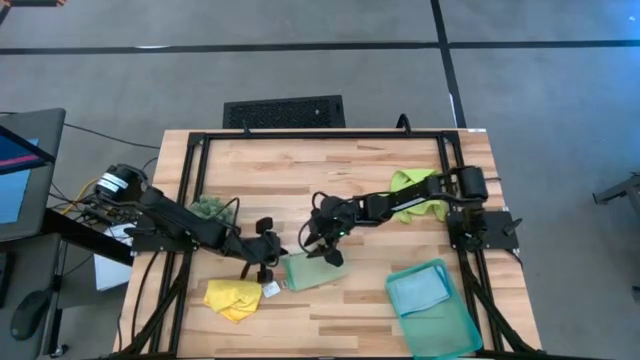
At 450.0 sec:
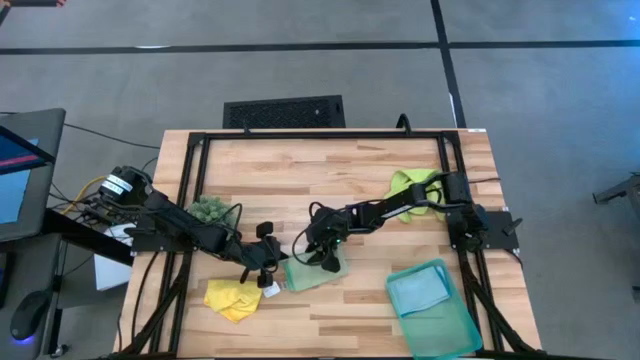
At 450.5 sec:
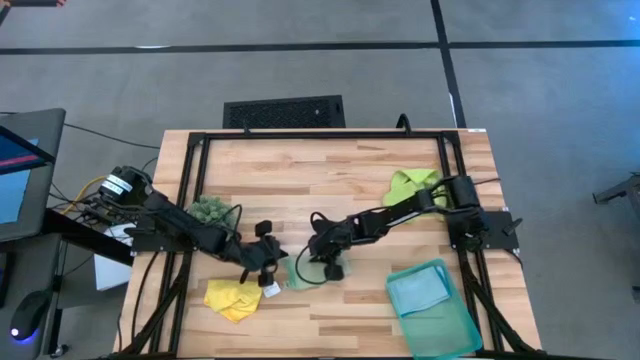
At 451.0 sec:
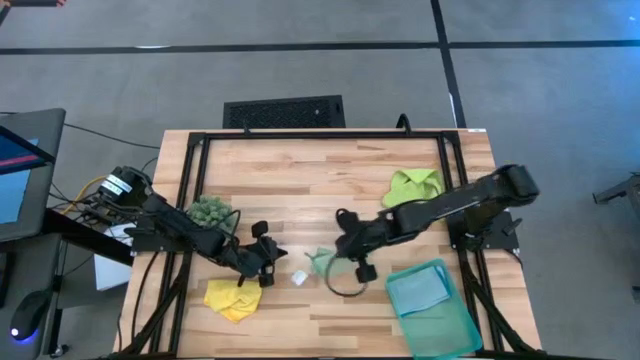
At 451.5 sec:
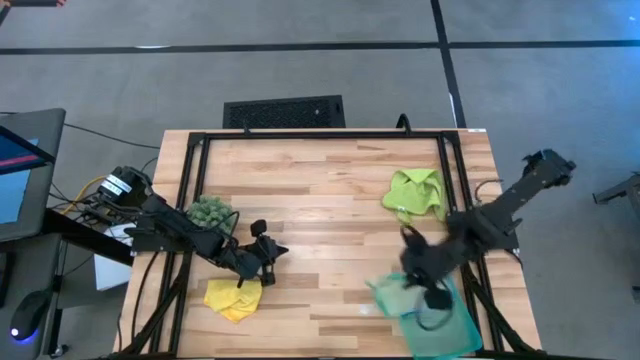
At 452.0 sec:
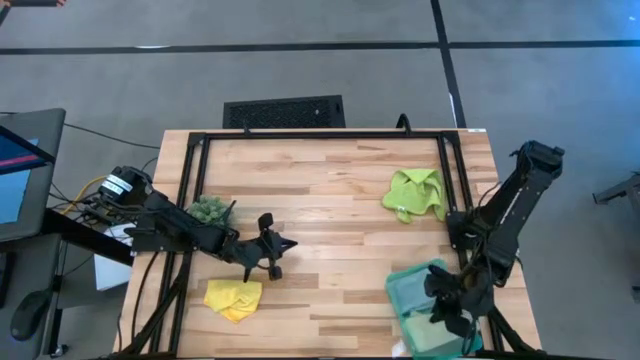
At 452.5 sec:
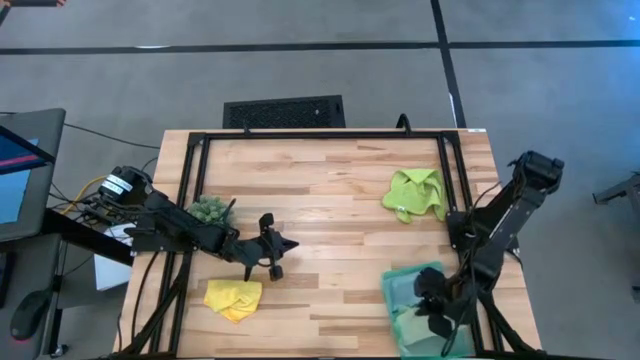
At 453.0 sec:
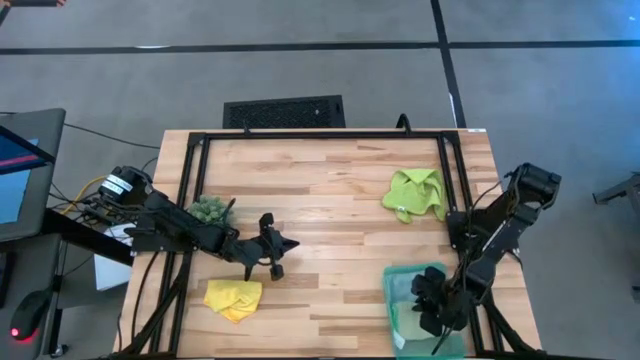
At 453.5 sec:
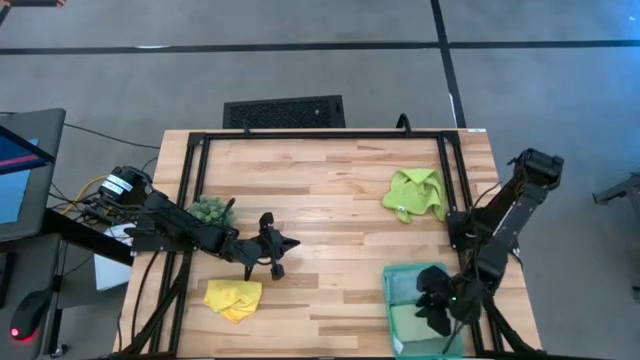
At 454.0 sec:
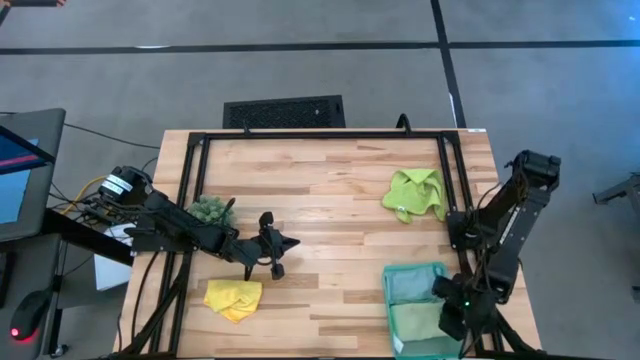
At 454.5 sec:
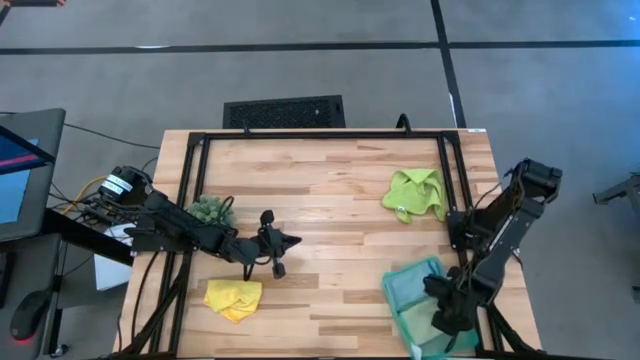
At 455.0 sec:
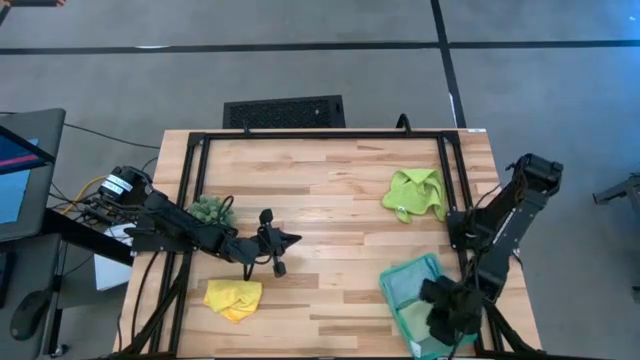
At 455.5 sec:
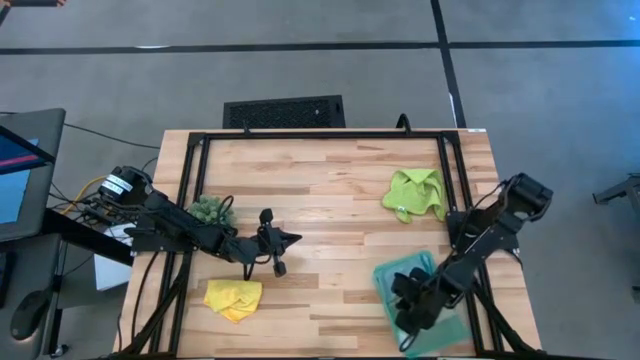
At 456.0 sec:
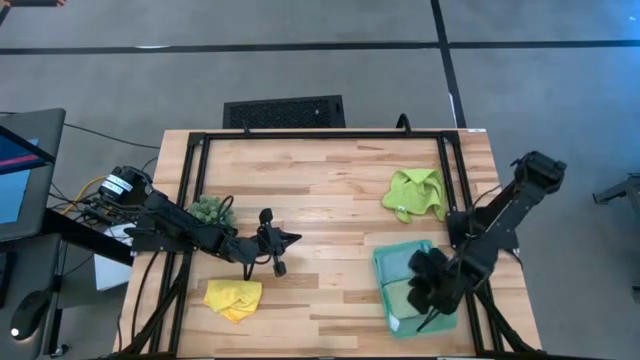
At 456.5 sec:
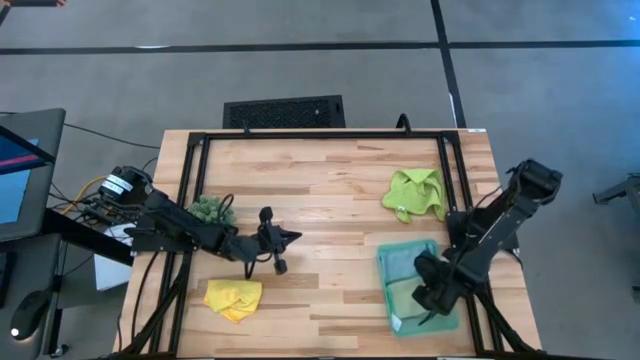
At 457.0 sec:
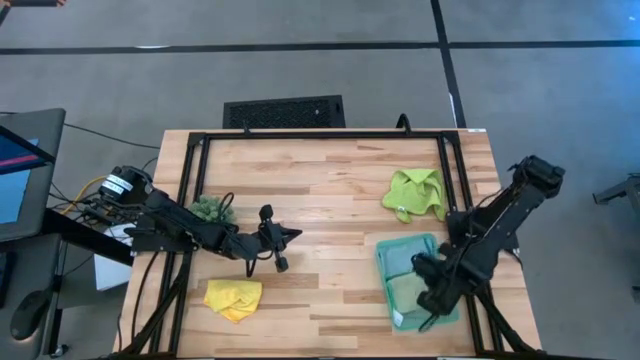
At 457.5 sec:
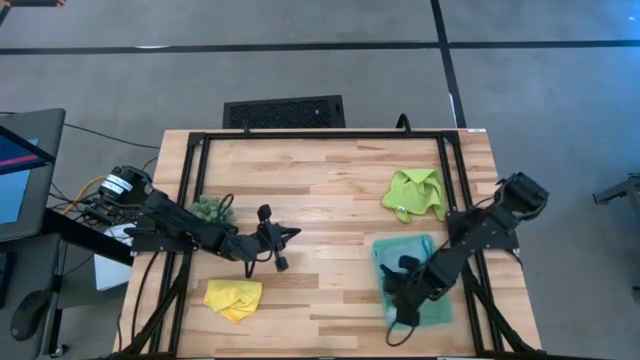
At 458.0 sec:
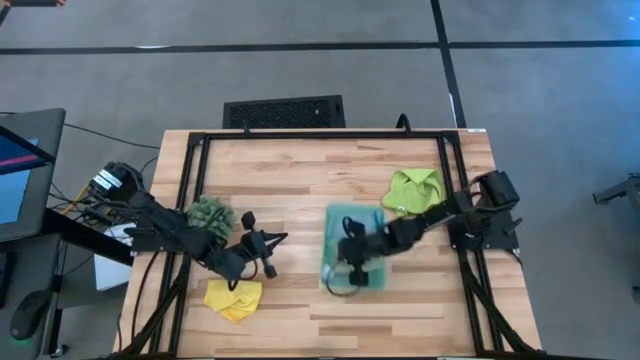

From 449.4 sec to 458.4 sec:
Task: Fold microfiber towels
Put the folded green microfiber cloth into the green bin

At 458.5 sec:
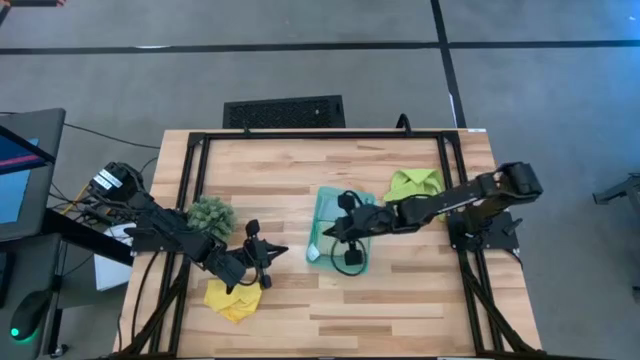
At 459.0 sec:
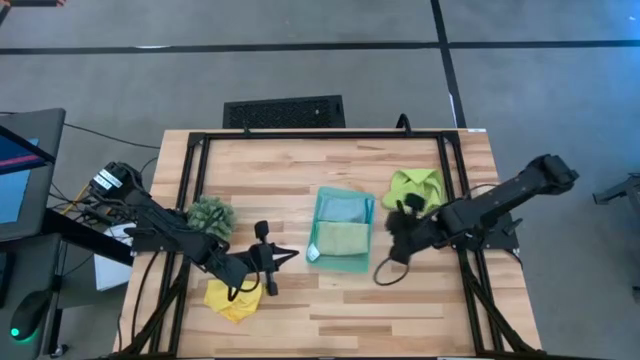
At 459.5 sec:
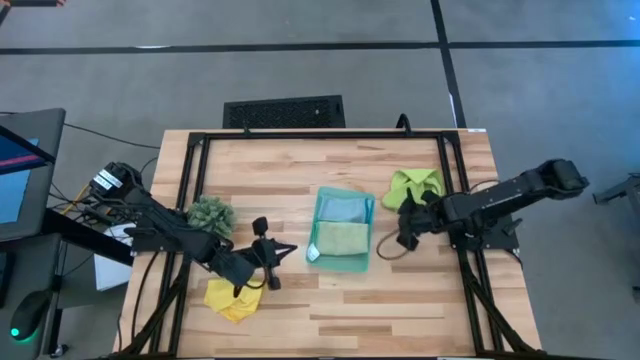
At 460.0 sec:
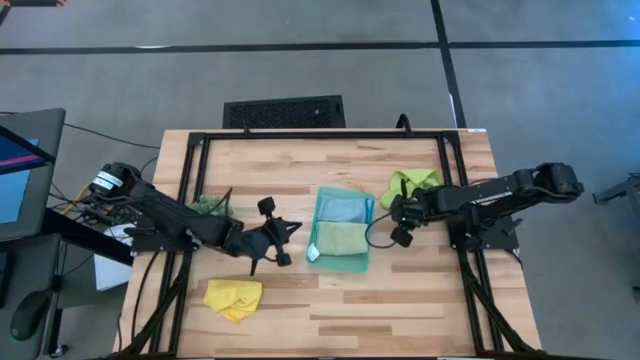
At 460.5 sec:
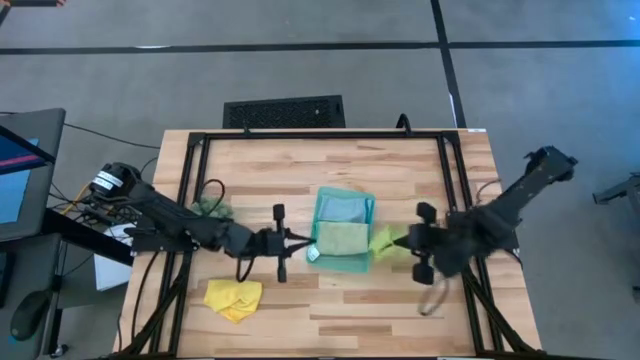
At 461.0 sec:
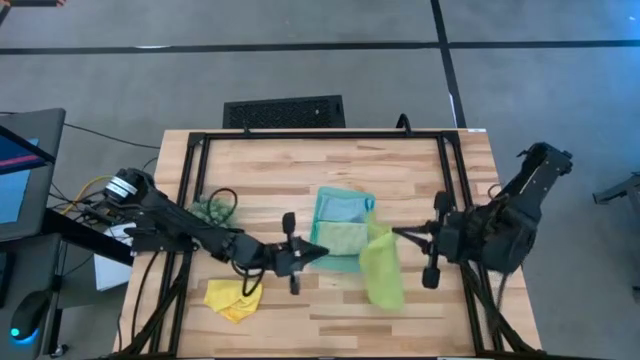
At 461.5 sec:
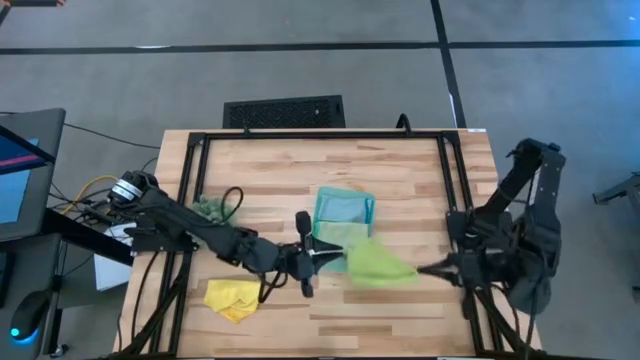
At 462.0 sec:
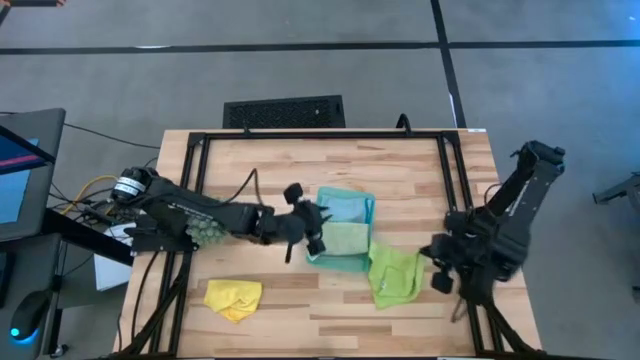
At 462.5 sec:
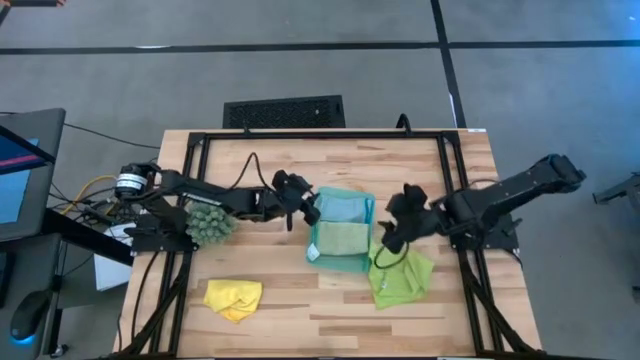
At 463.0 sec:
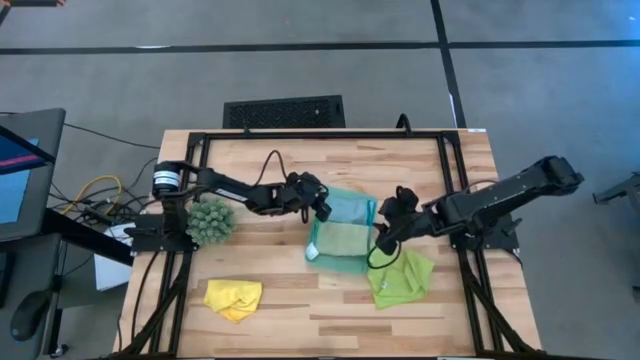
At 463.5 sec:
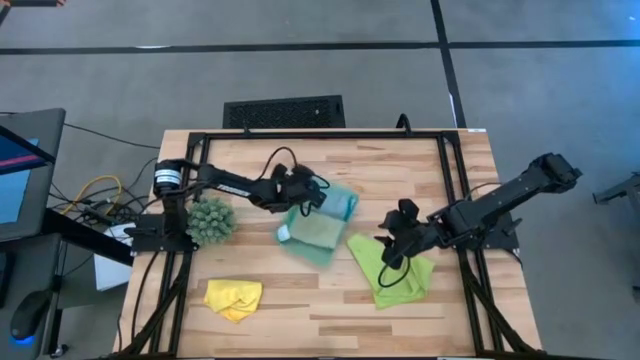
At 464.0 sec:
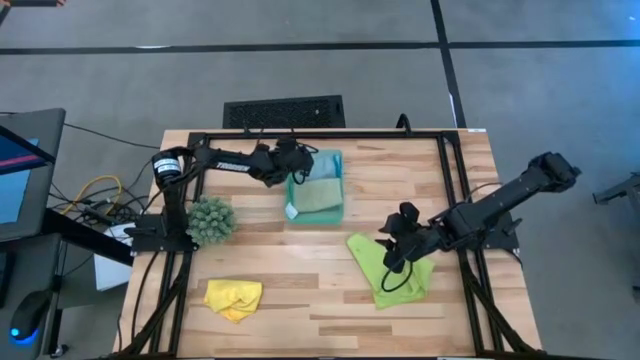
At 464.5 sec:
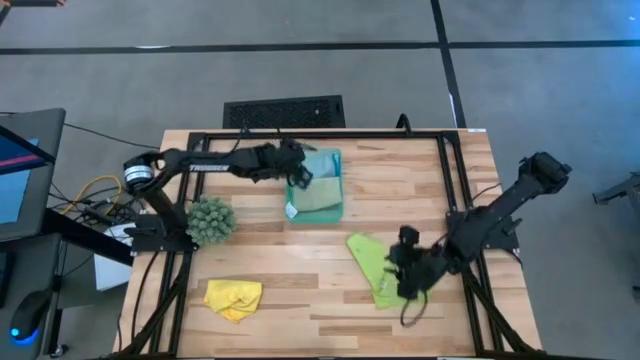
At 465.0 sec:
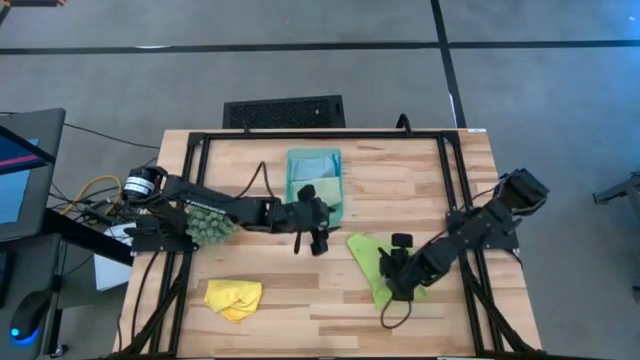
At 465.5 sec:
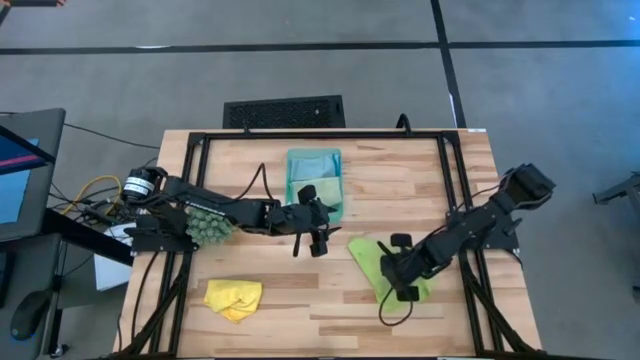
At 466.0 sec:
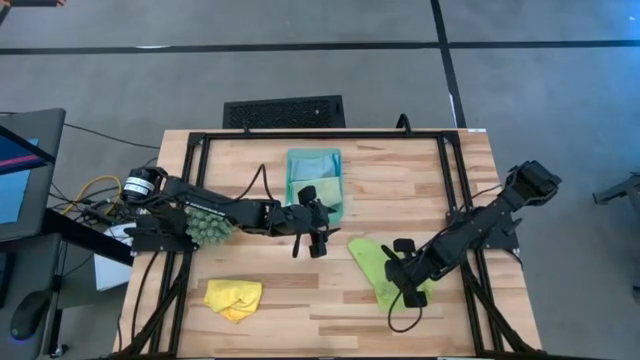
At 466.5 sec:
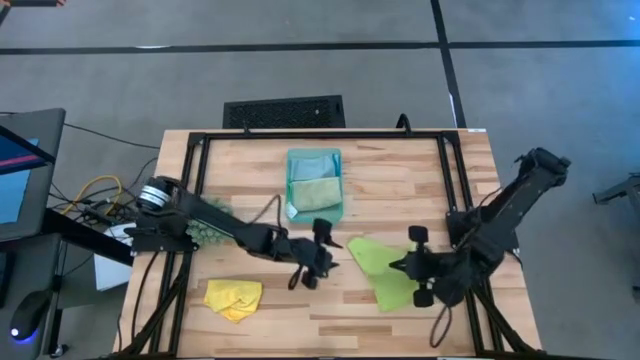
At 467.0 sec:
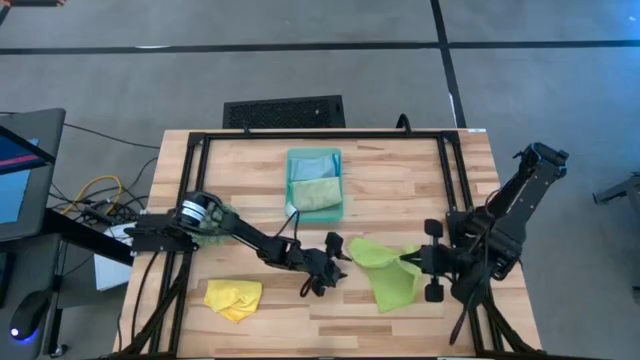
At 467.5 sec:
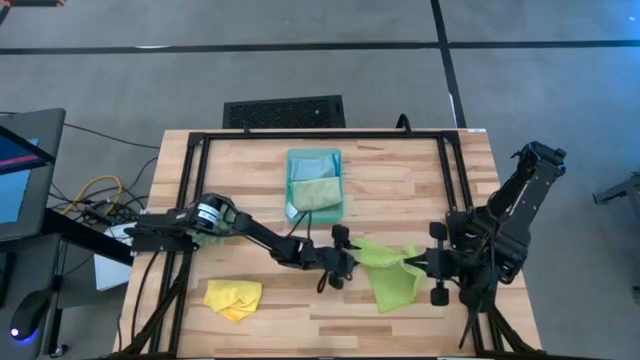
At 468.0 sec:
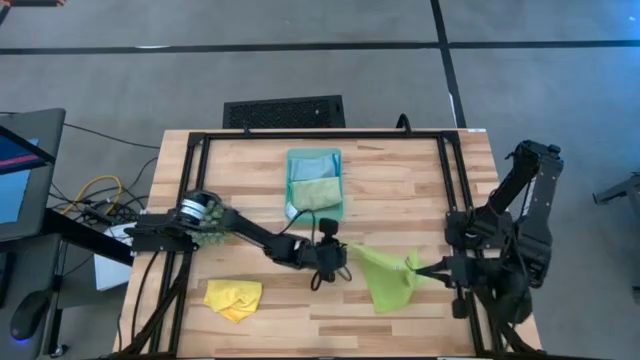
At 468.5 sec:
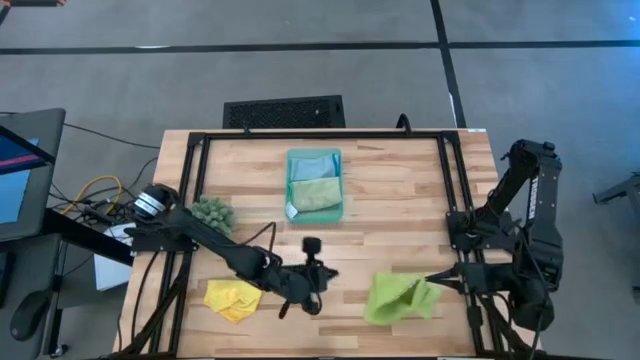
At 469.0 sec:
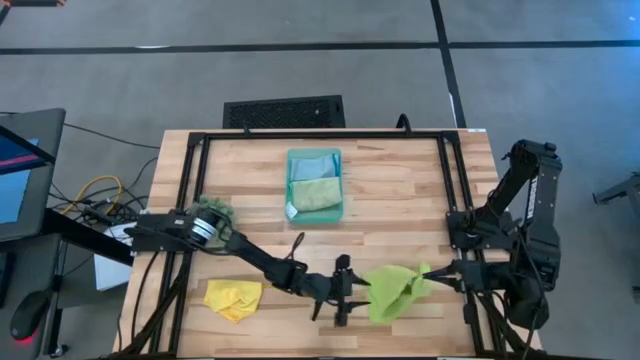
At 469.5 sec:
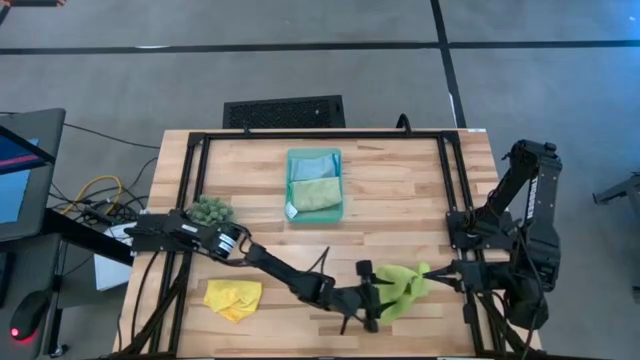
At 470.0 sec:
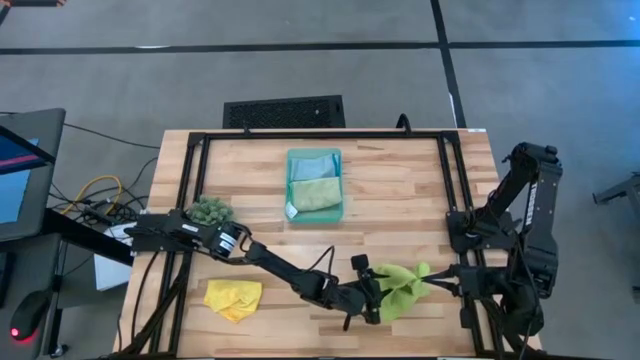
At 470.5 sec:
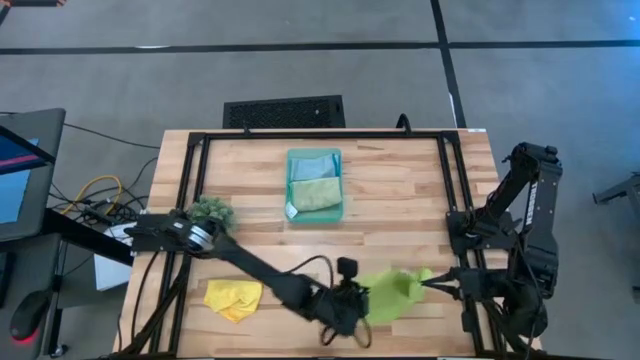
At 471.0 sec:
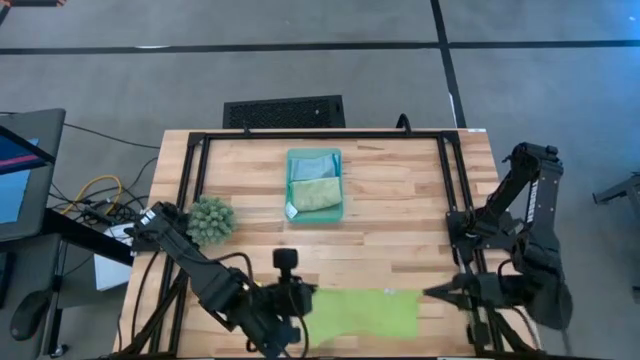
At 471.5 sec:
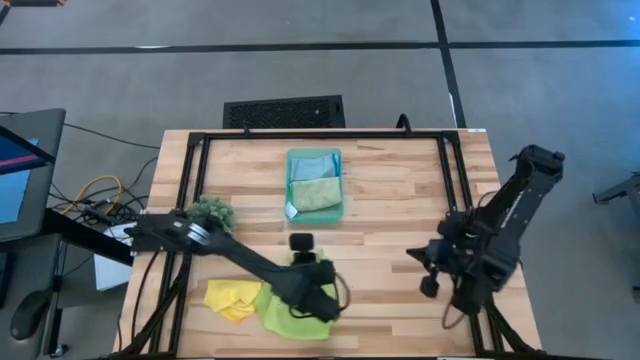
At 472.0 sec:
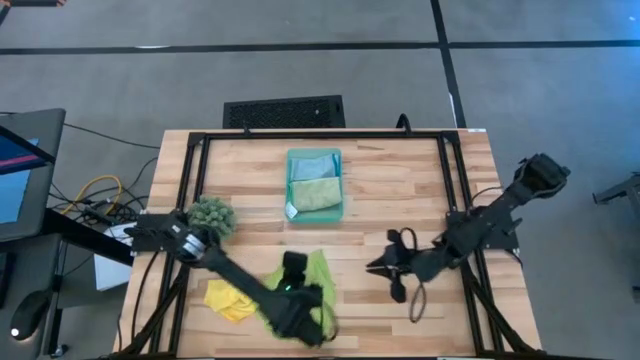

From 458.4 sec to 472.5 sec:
Fold the light green microfiber cloth
